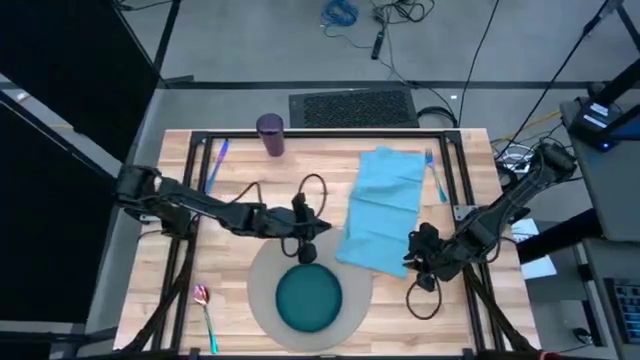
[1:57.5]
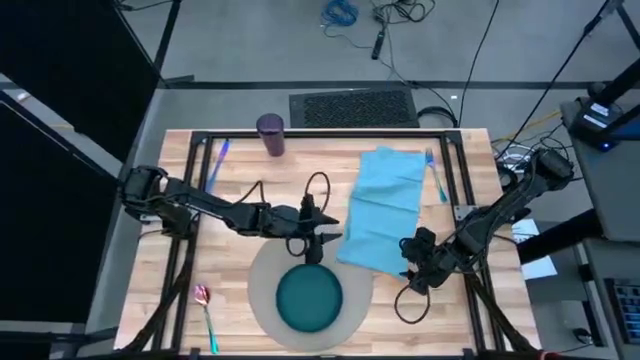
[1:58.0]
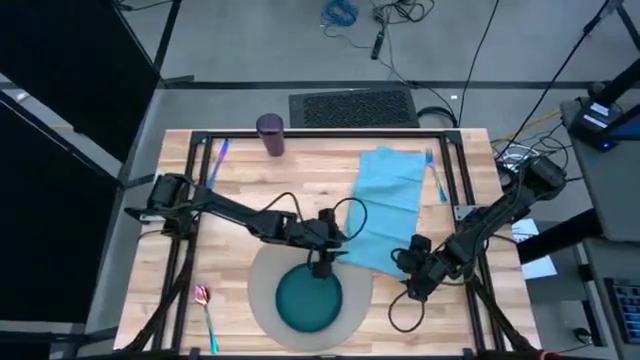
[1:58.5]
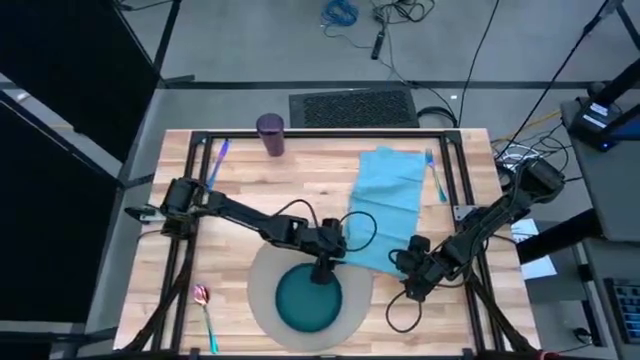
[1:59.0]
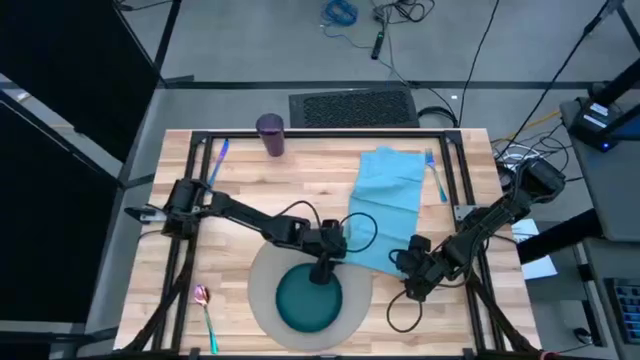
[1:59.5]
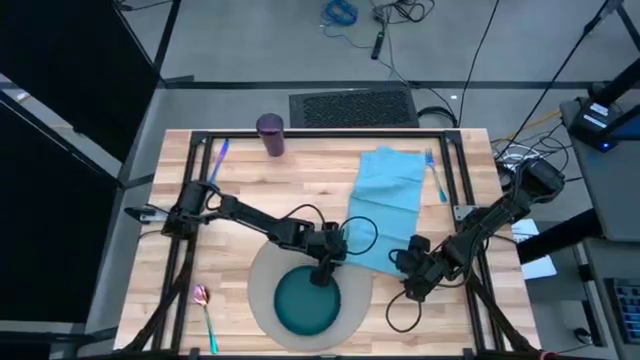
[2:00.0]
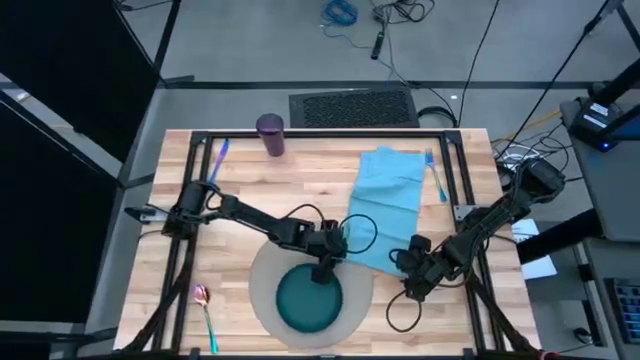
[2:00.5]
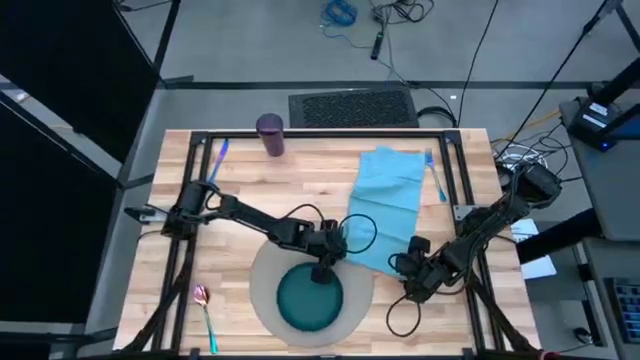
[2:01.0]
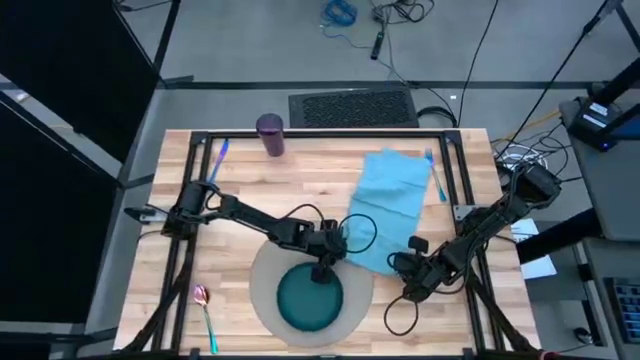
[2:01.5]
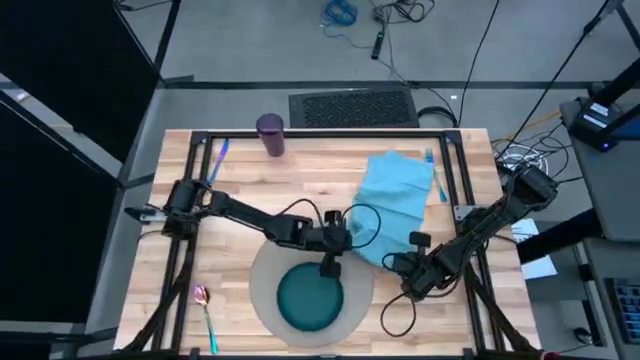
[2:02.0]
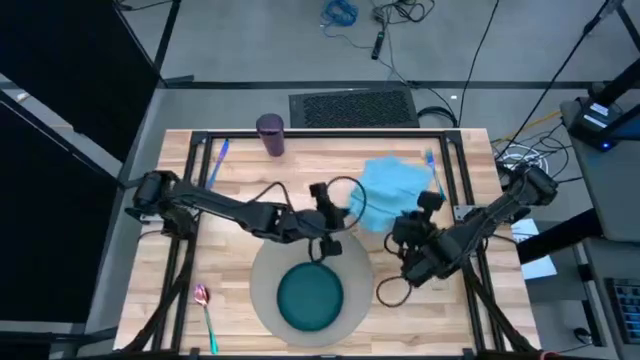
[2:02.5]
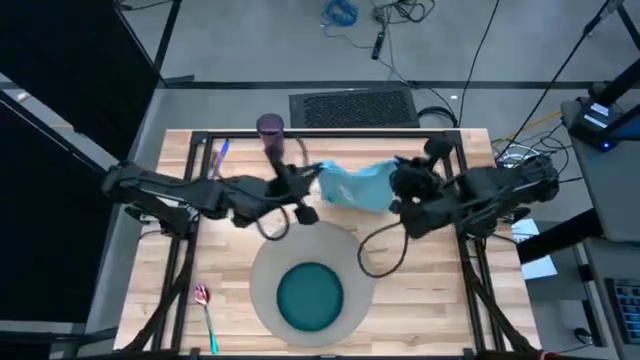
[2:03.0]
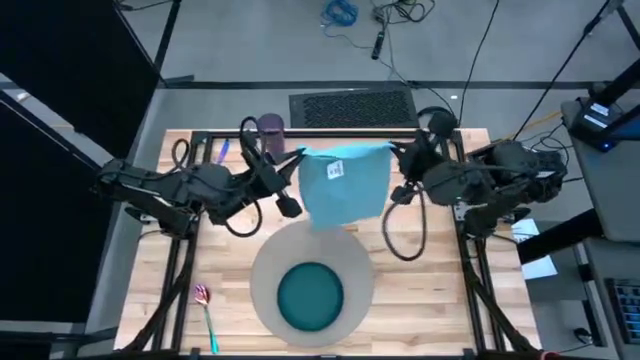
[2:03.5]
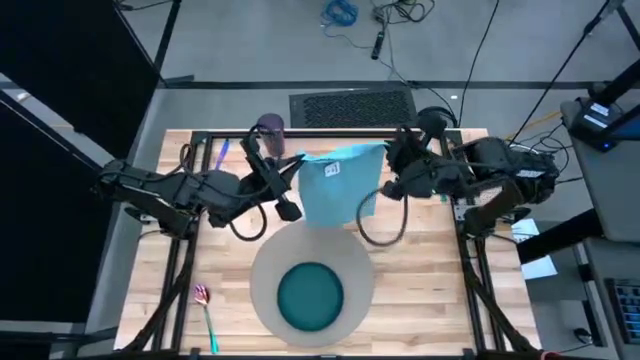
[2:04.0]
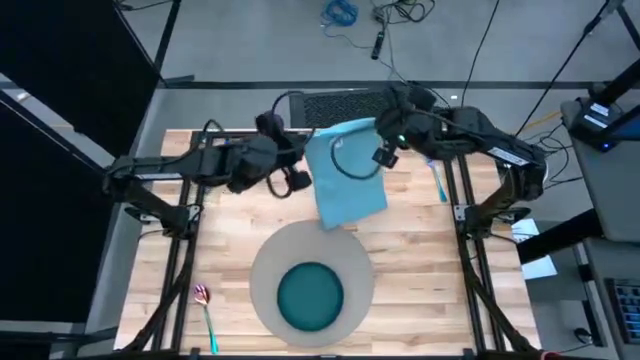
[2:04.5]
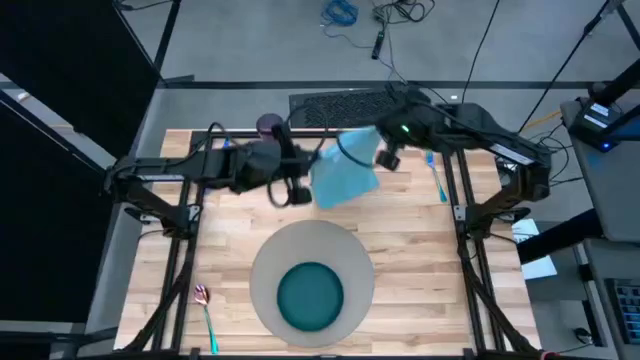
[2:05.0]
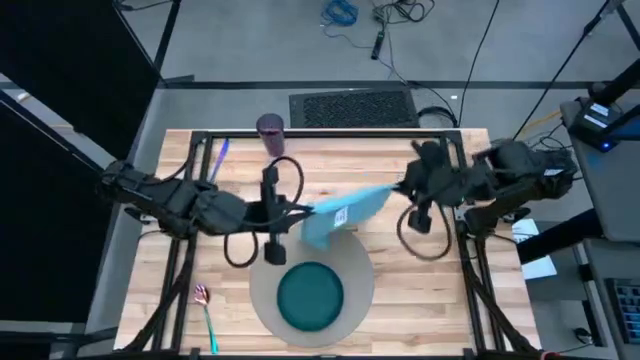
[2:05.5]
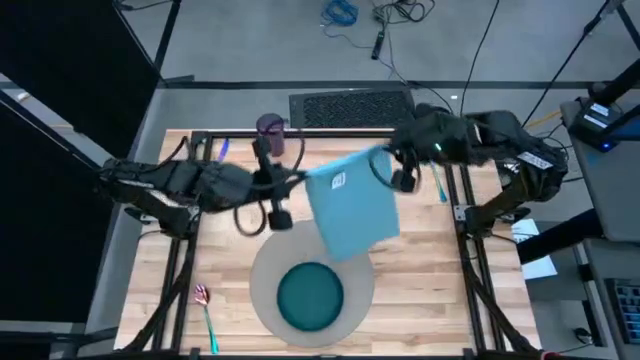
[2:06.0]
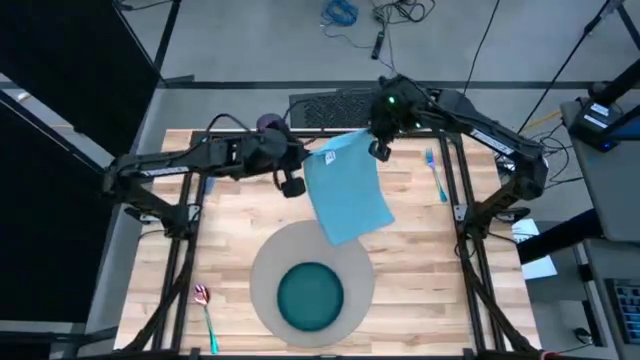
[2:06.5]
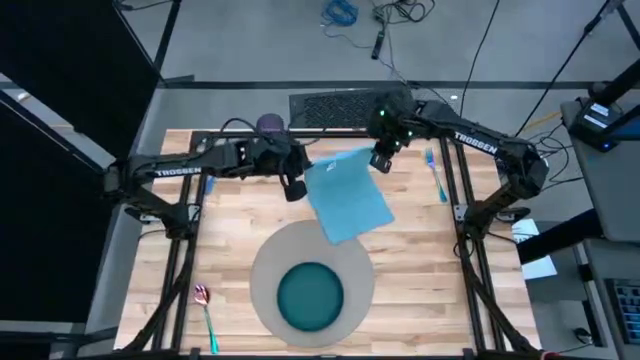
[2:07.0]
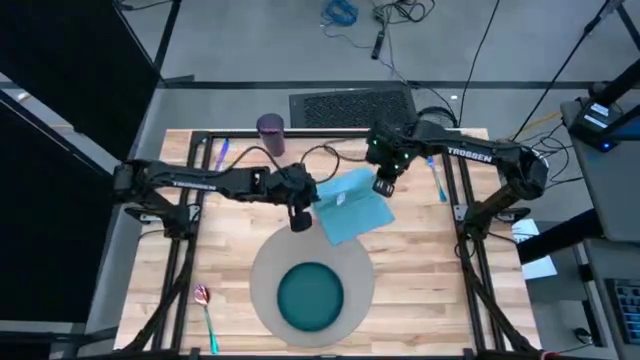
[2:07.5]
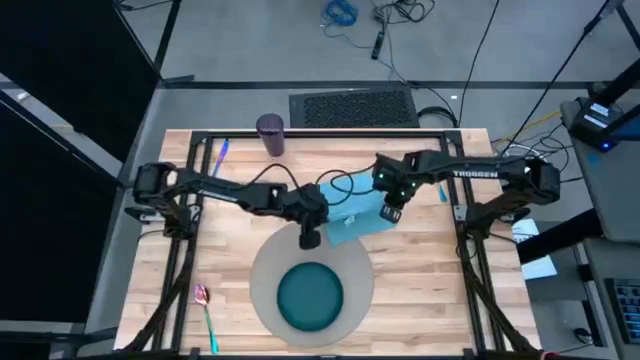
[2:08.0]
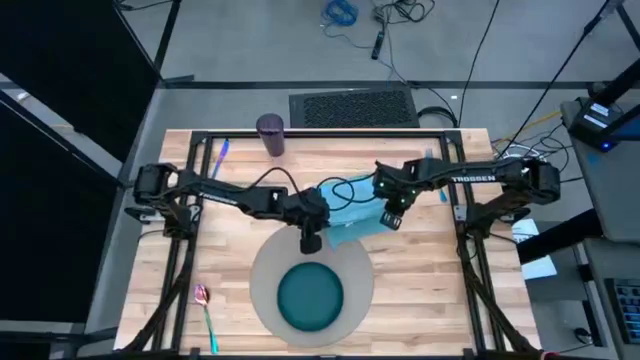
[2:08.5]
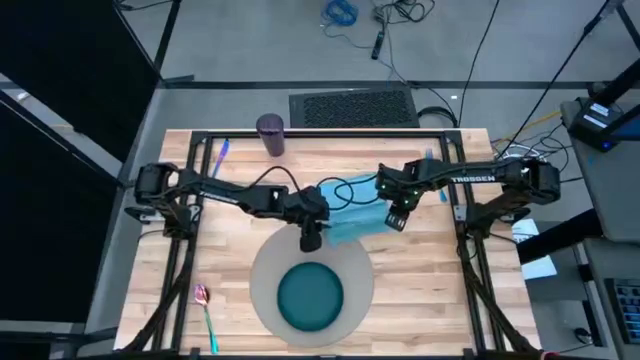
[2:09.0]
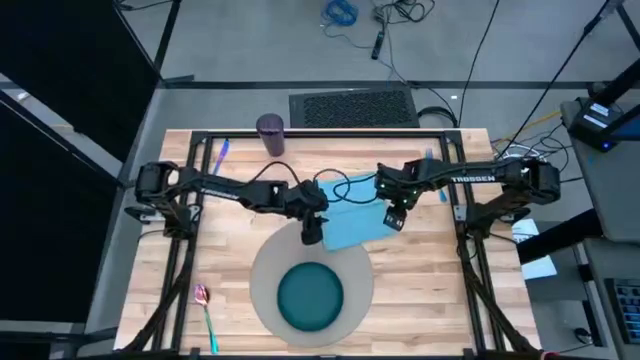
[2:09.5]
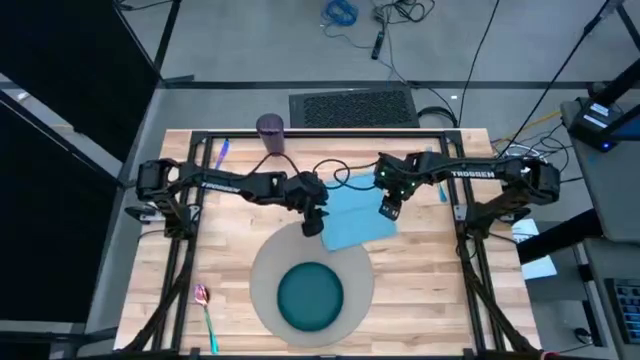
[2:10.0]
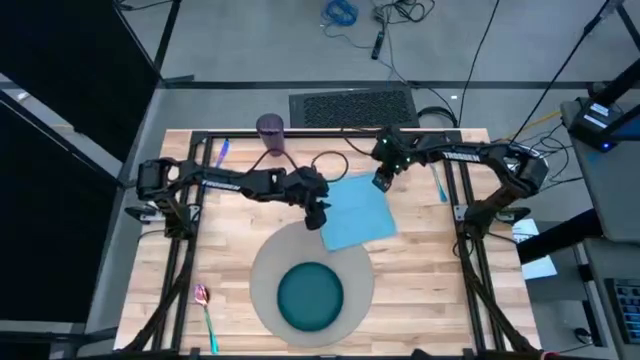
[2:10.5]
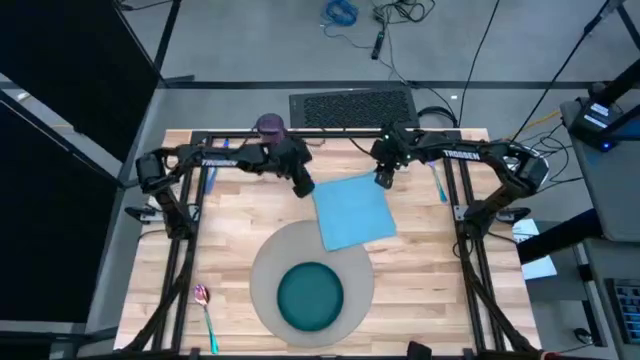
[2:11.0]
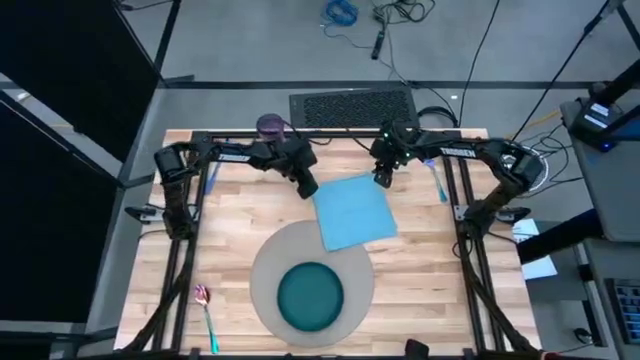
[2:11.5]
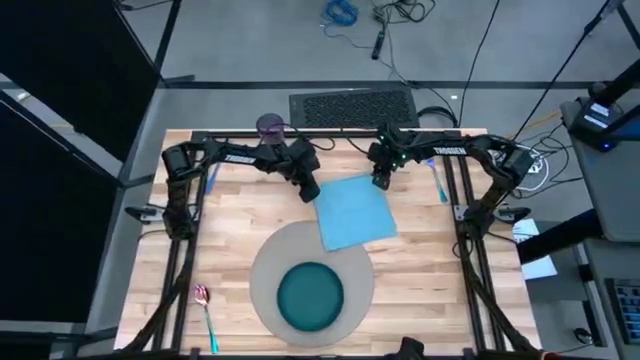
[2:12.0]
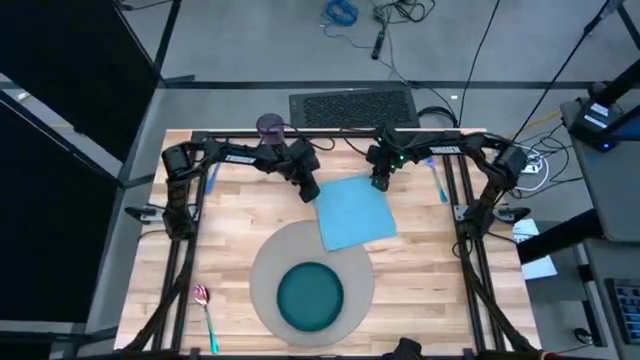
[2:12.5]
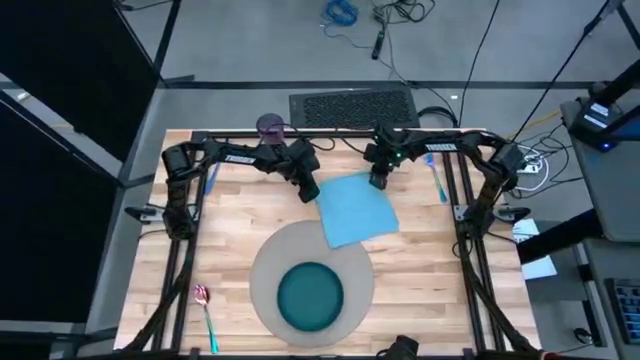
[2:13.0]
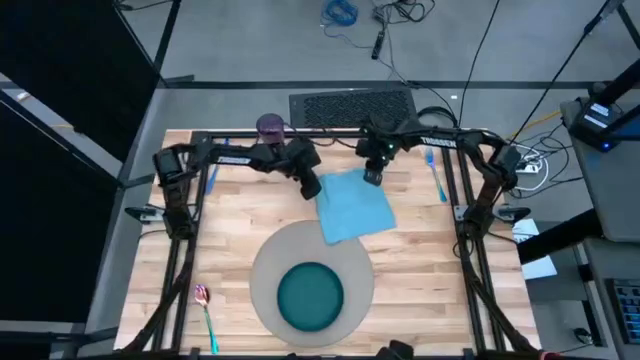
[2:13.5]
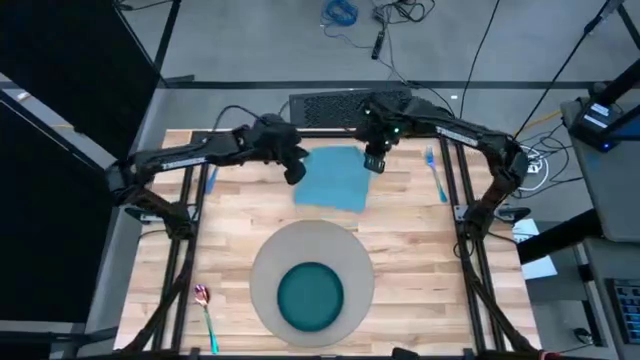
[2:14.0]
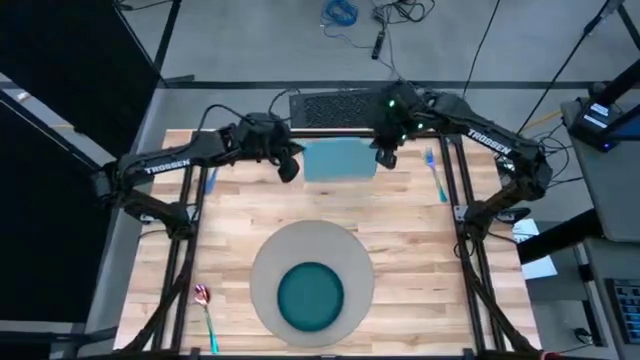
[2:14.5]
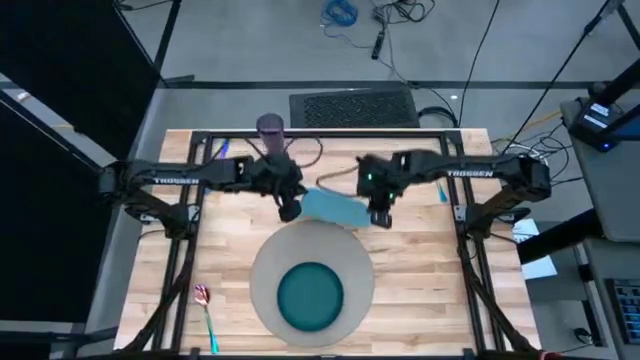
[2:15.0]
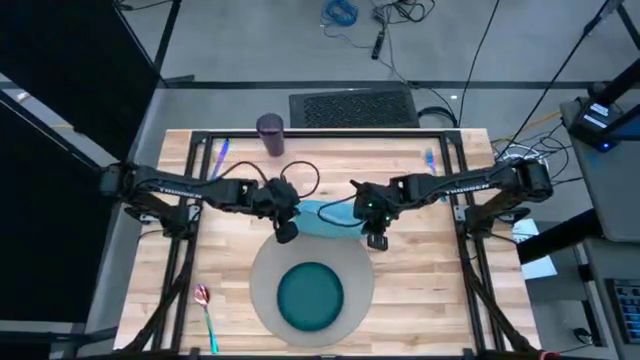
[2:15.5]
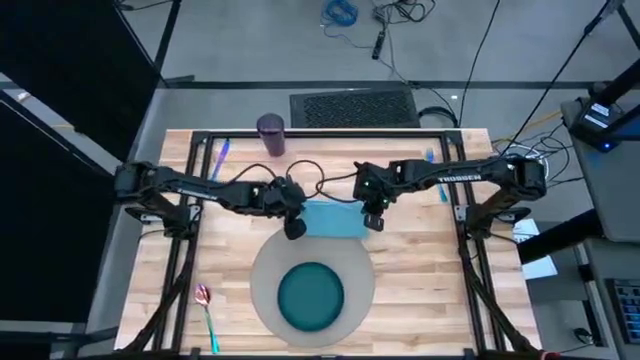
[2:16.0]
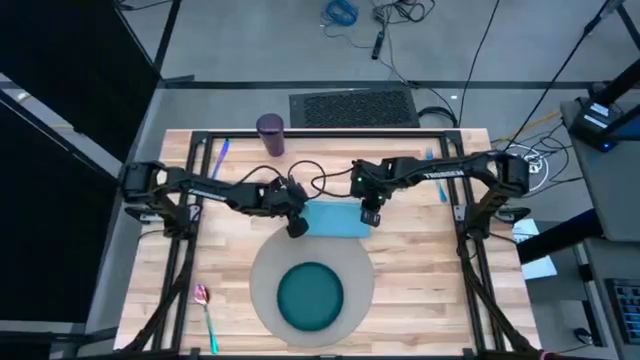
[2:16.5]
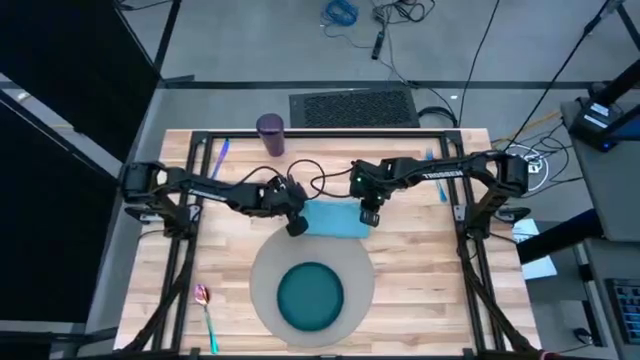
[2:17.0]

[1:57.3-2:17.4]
Task: Set table place
Fold the blue table napkin
